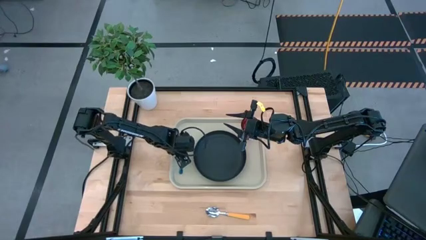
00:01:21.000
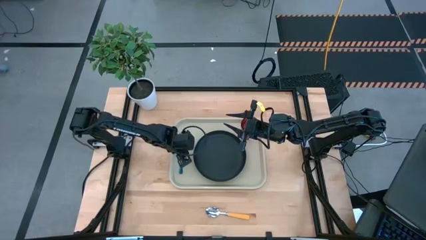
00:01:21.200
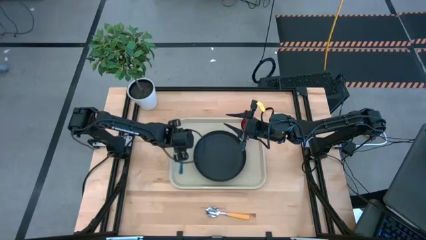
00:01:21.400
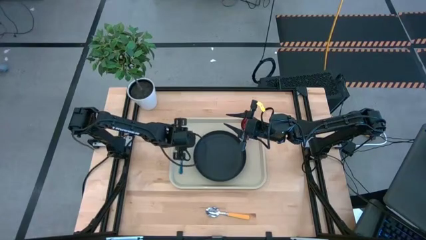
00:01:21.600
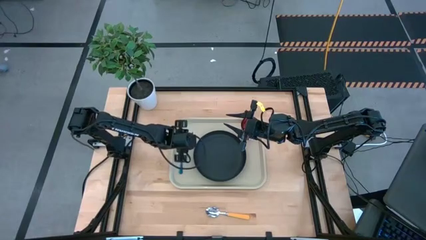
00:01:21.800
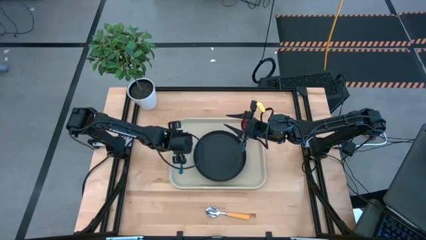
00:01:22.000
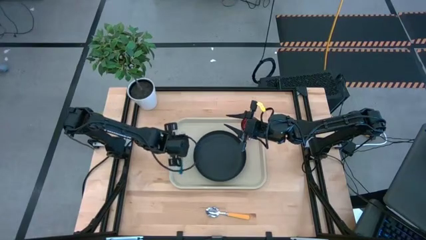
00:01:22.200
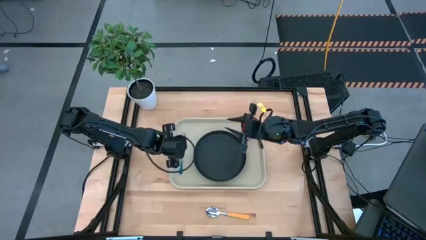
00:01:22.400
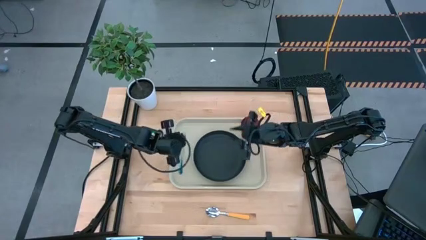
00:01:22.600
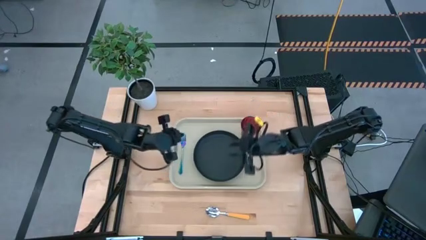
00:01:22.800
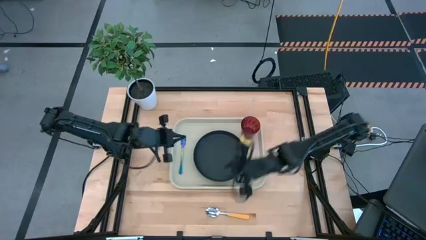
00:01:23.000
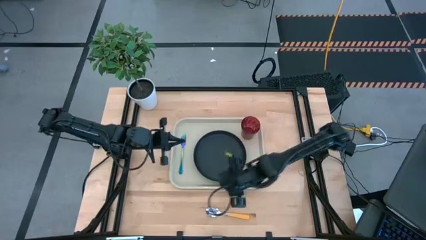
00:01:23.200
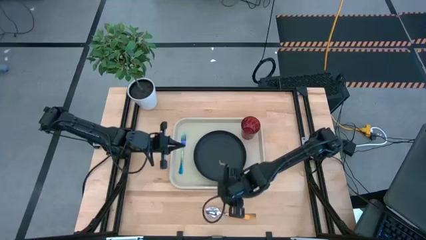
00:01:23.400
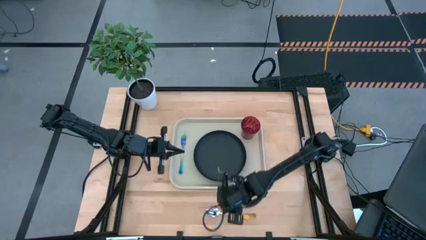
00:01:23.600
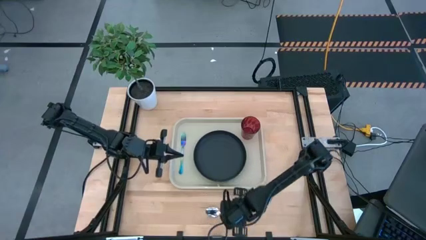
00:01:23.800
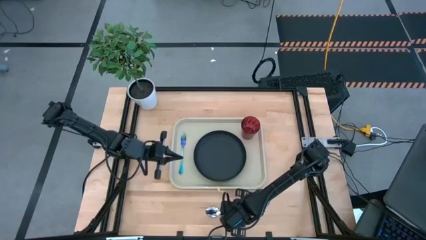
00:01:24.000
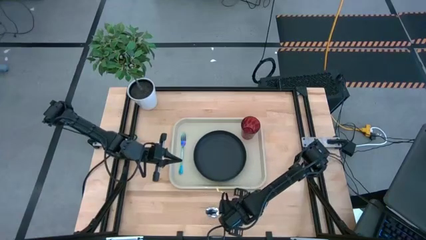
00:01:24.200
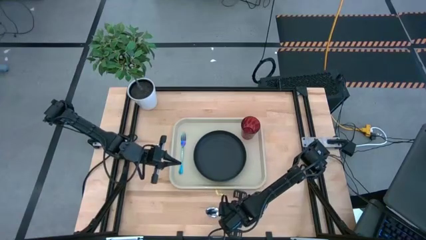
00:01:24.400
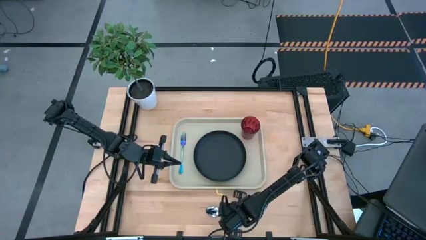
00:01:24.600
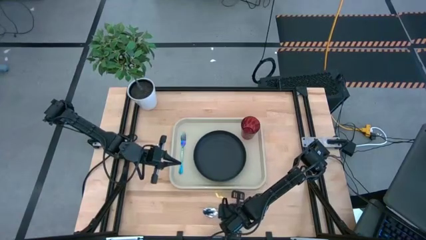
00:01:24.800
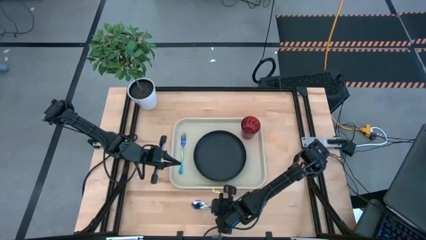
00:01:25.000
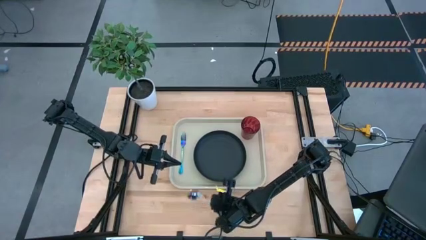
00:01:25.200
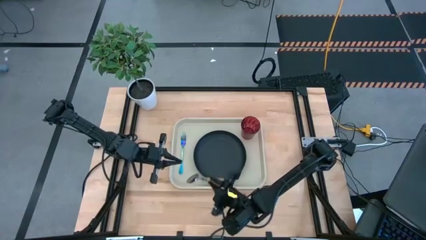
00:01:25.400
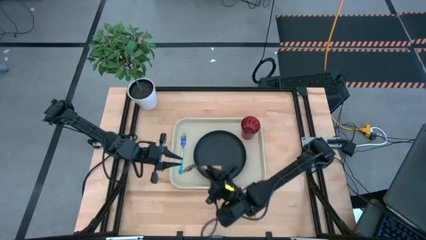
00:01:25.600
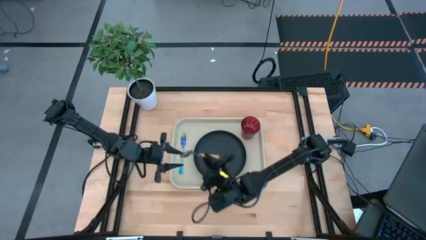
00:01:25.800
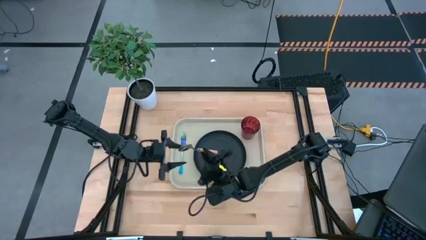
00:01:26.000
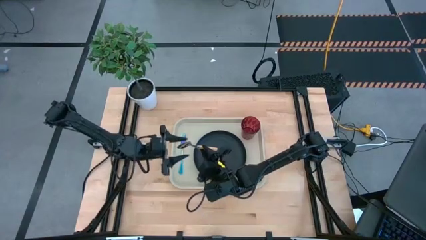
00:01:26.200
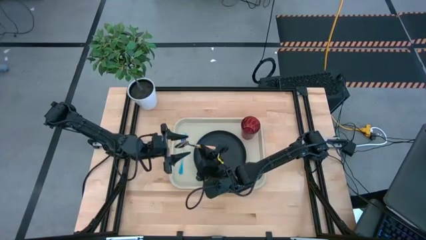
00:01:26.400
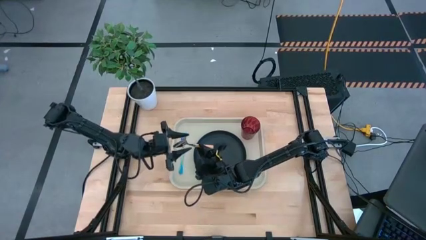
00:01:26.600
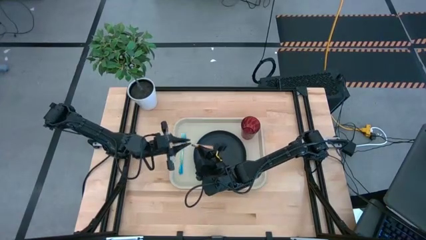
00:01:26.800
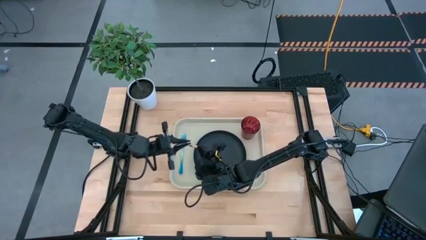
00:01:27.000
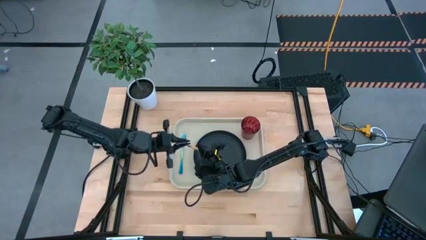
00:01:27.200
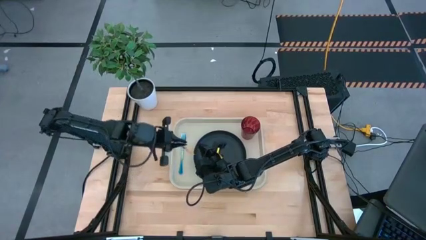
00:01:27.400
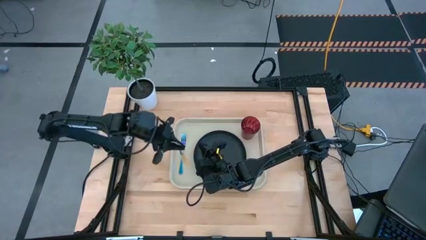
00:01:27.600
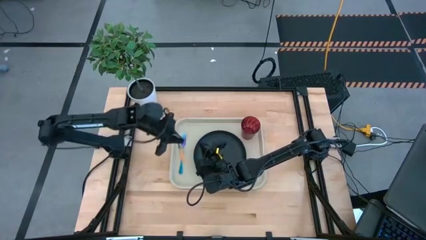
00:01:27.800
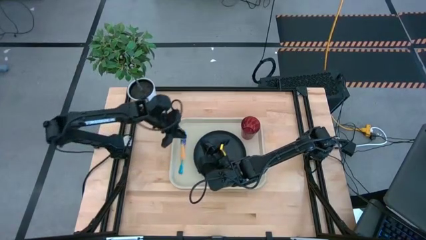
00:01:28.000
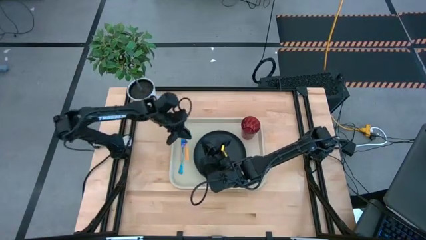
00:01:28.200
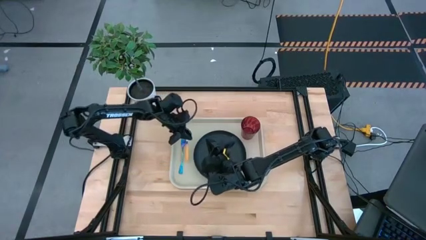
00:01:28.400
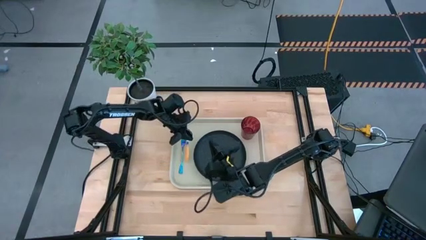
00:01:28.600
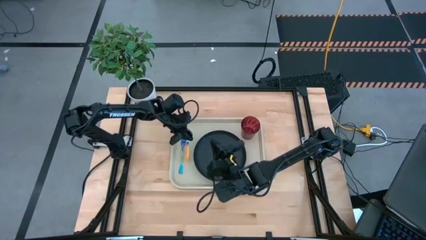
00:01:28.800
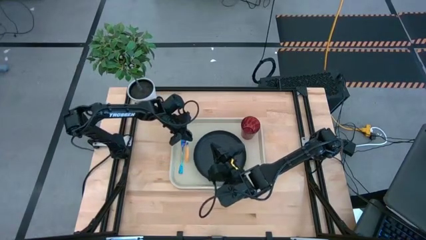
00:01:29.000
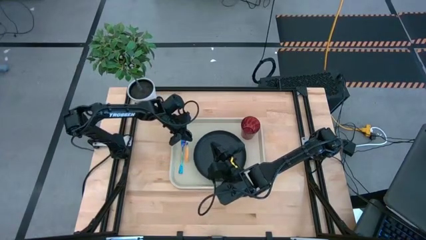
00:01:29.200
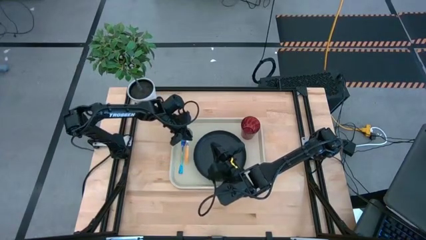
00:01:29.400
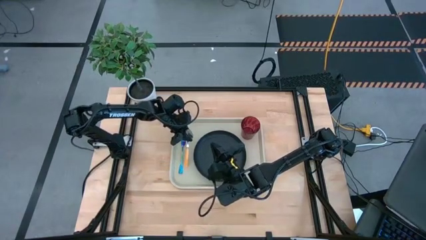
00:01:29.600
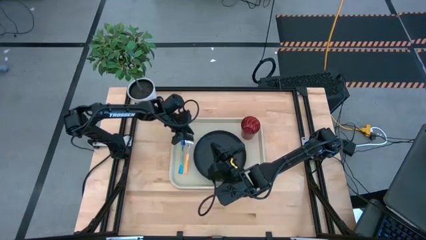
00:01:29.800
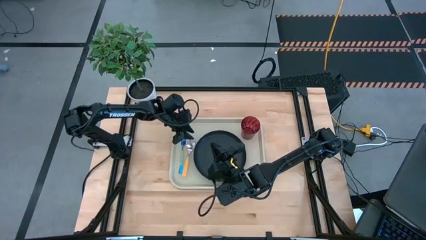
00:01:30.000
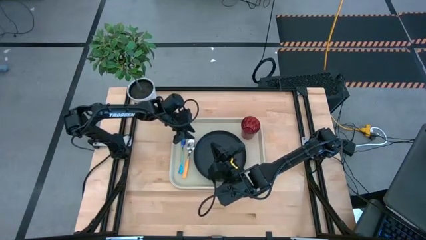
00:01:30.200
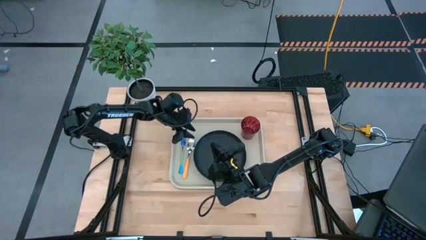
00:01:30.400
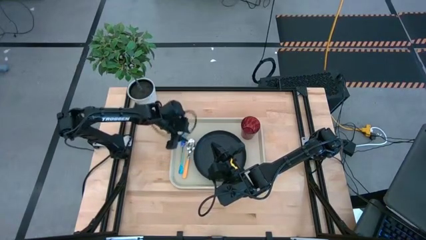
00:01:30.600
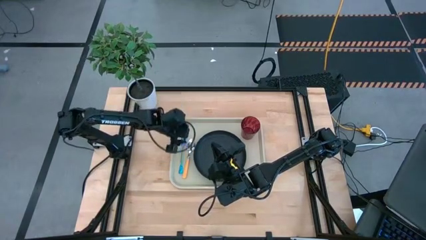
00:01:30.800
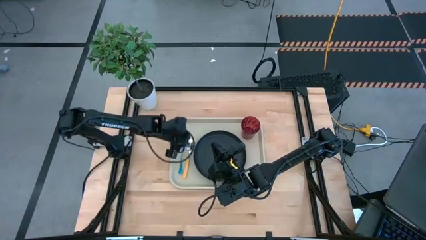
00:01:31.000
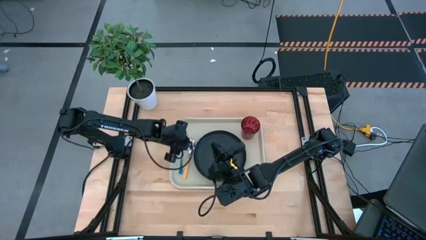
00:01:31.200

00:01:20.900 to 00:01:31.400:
Task: Pick and place plate/cup/fork/spoon on tray
Put the orange spoon on the gray tray between the black plate and the blue fork

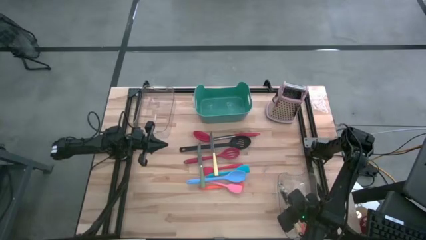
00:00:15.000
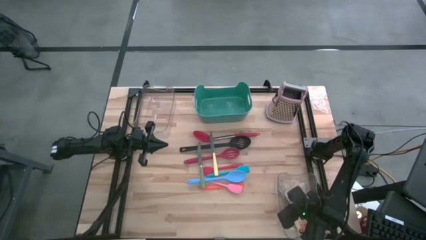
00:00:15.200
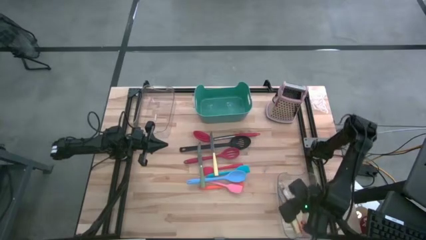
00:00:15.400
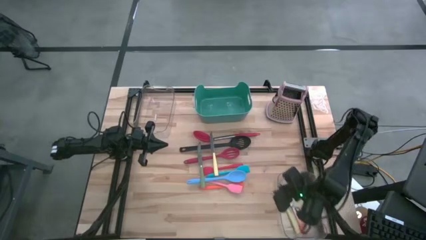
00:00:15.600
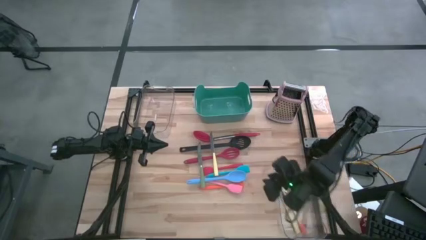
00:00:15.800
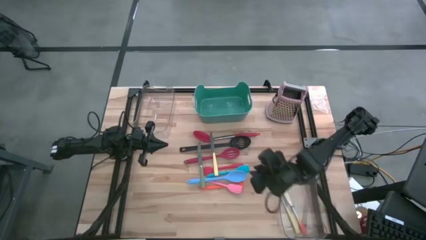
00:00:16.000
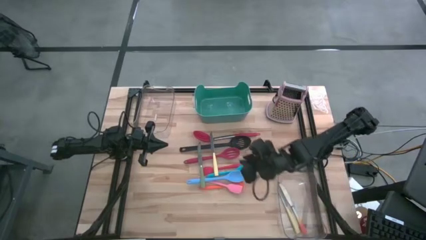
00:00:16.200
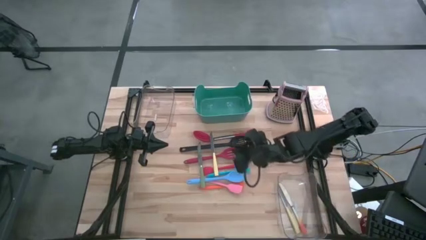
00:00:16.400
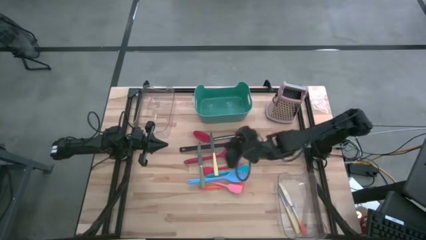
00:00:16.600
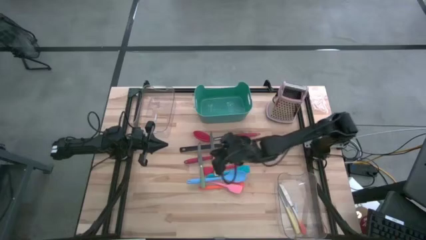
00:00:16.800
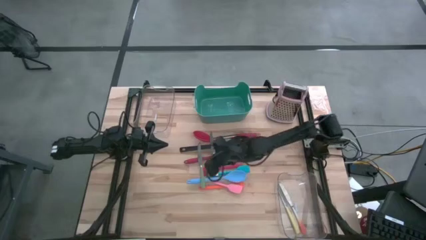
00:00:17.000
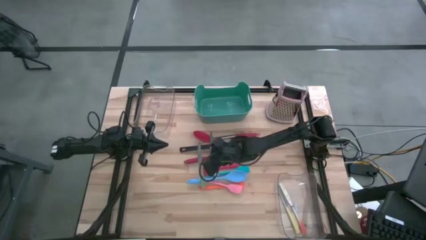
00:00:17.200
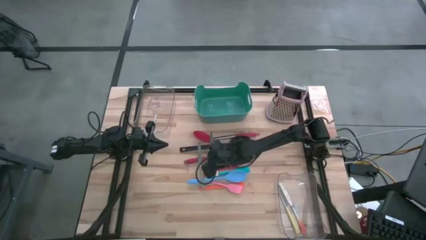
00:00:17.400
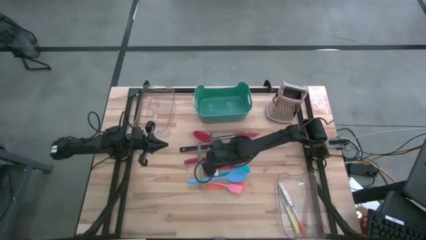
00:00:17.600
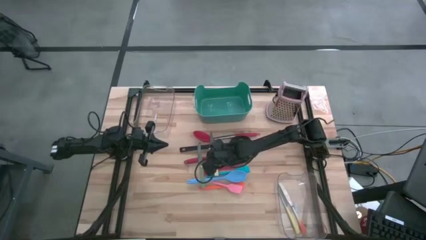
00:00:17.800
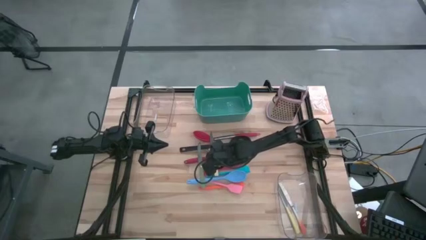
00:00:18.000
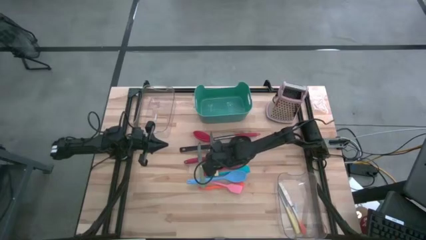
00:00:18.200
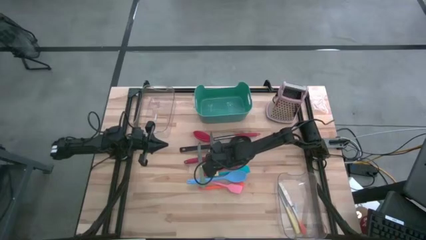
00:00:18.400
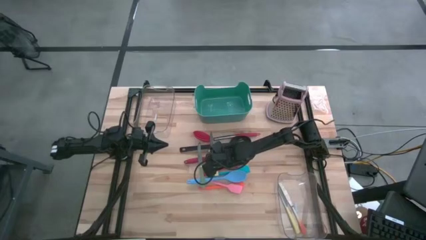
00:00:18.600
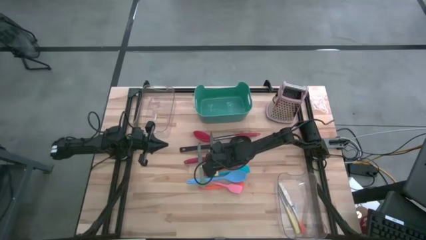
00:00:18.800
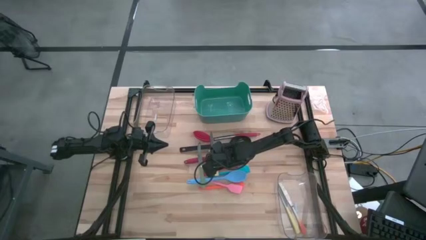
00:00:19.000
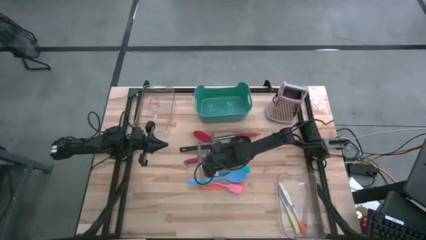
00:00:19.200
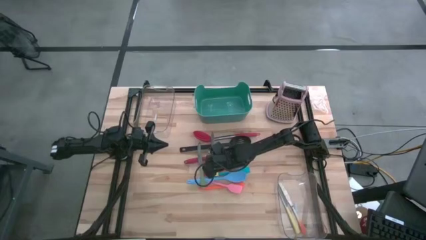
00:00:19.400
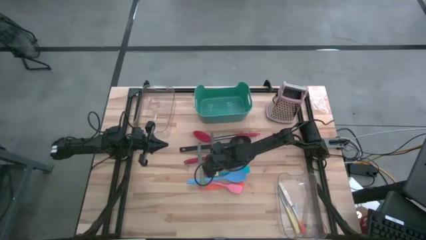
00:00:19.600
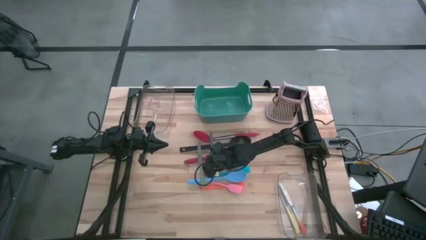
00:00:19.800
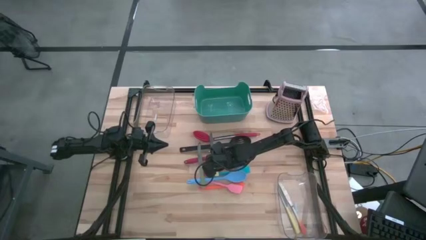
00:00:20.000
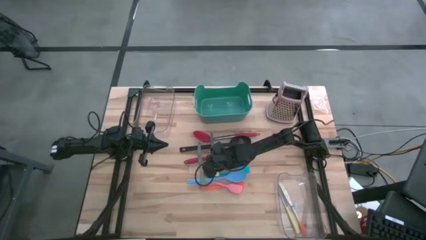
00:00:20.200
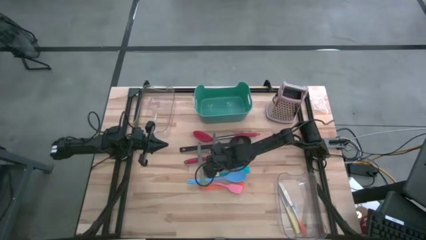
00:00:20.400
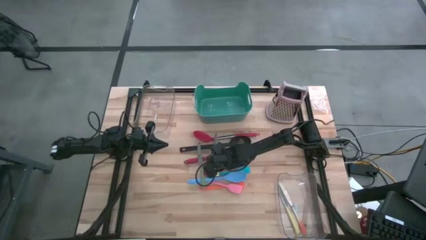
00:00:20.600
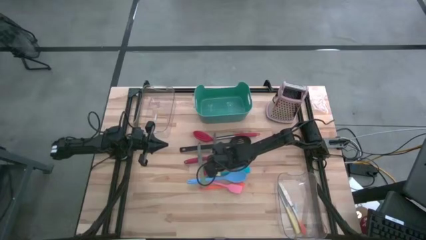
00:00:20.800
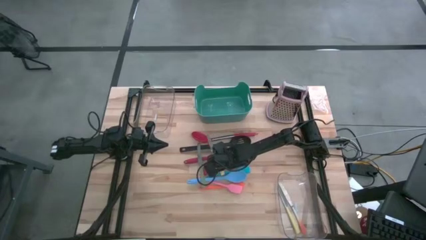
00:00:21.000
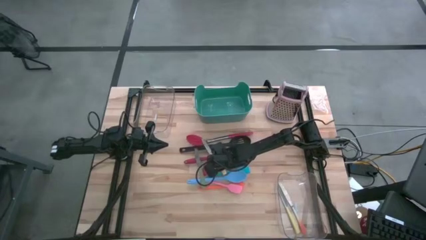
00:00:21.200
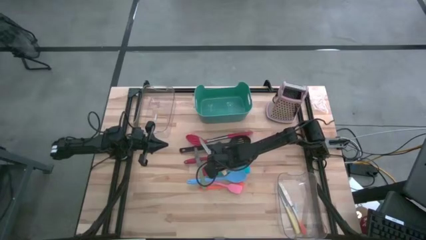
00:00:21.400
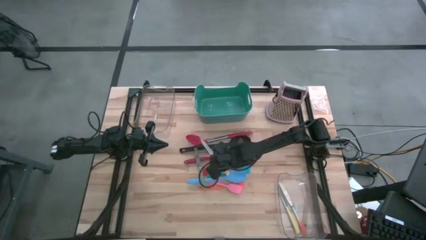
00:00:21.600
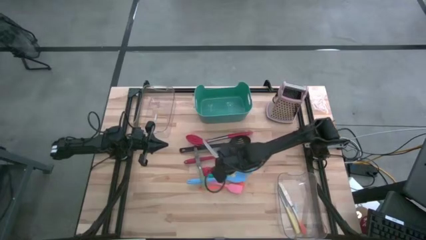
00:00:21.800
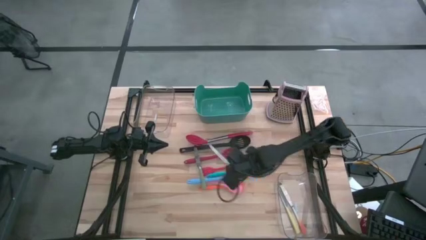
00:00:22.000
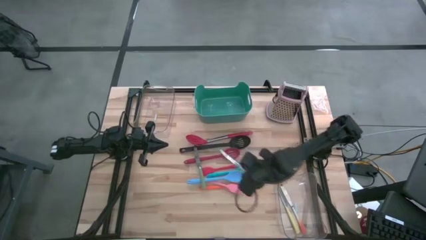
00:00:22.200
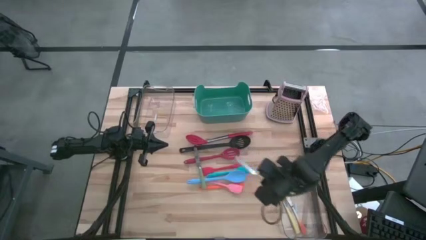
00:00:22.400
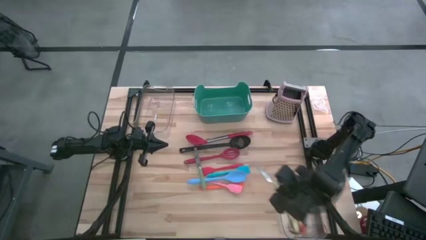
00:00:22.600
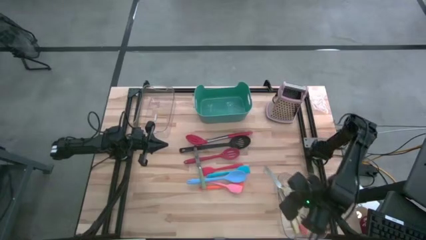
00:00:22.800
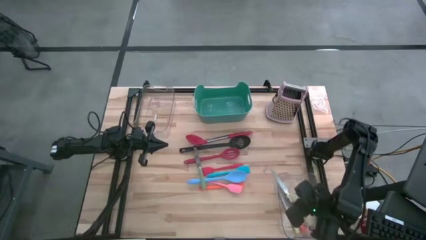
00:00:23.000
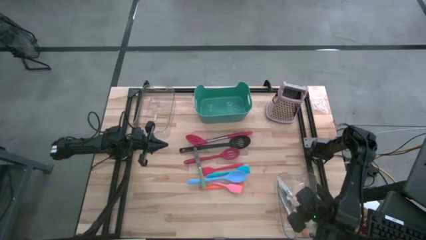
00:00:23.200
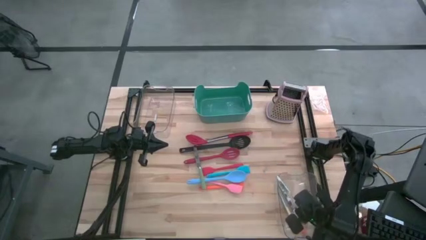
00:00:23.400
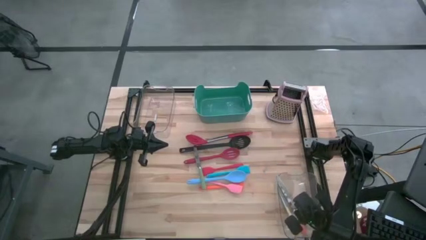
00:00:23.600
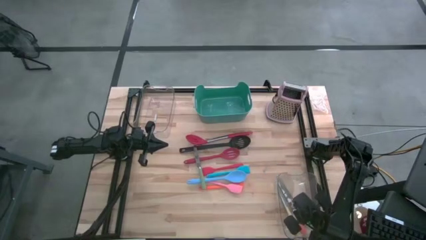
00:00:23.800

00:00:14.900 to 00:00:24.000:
Task: Pick & Place Kitchen Items
Put the yellow knife into the bottom transparent bin
